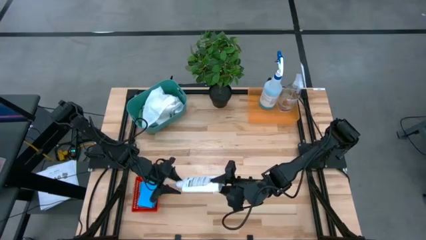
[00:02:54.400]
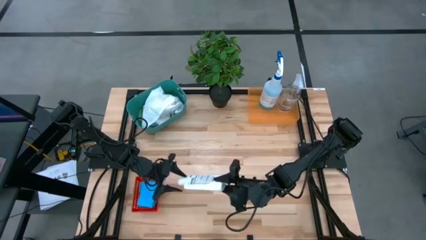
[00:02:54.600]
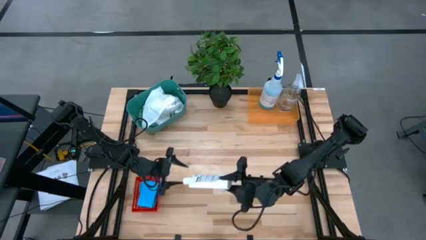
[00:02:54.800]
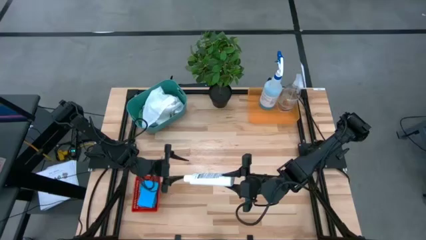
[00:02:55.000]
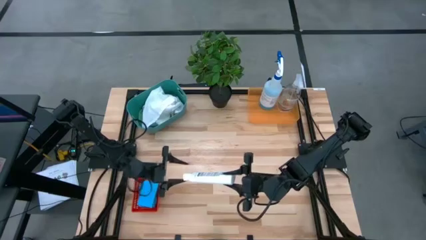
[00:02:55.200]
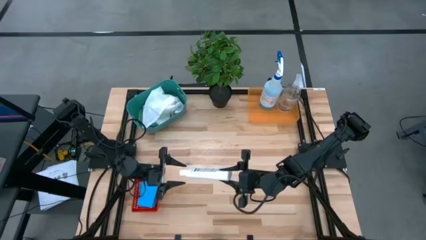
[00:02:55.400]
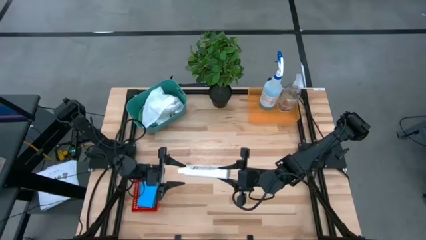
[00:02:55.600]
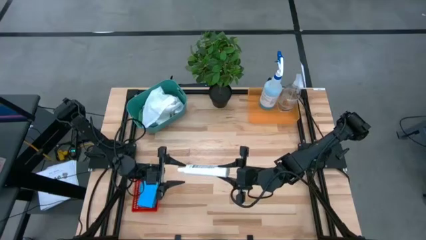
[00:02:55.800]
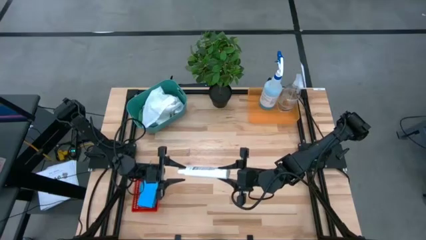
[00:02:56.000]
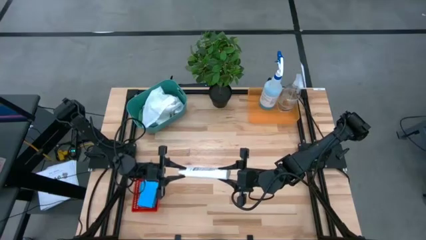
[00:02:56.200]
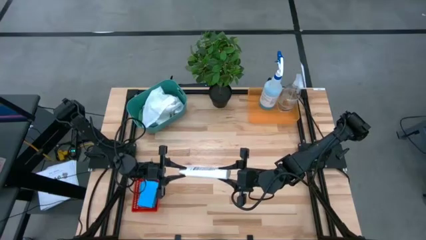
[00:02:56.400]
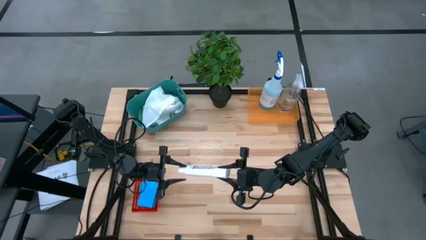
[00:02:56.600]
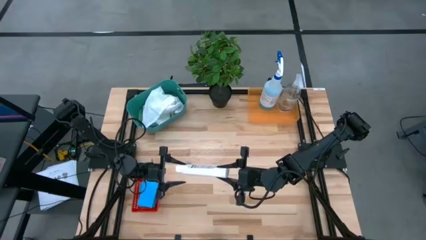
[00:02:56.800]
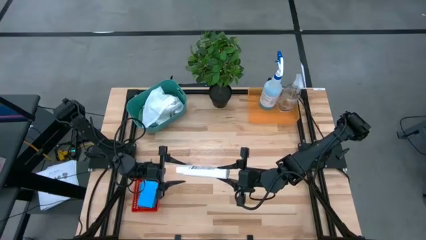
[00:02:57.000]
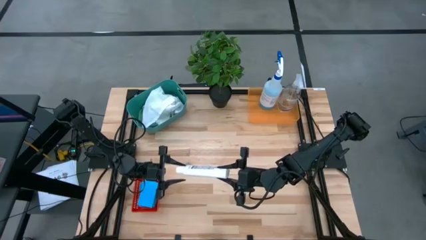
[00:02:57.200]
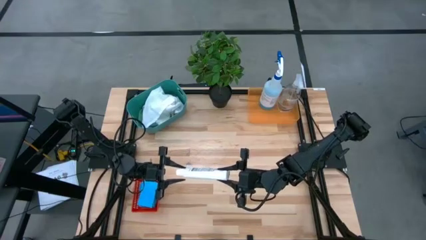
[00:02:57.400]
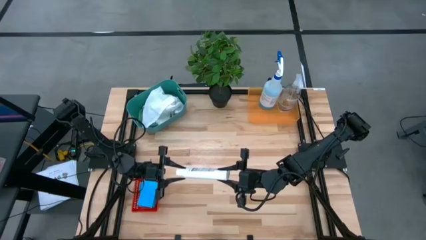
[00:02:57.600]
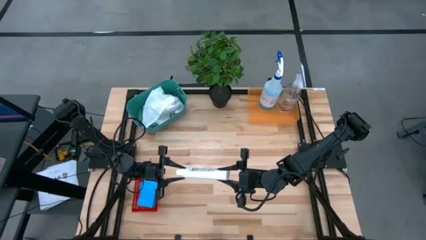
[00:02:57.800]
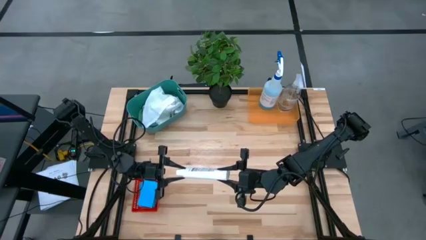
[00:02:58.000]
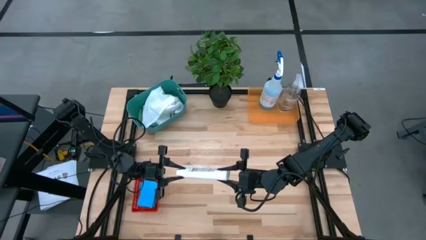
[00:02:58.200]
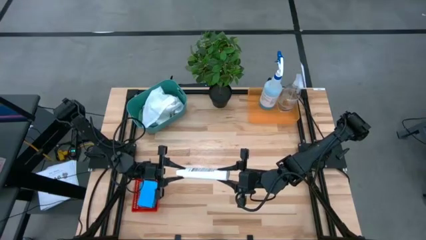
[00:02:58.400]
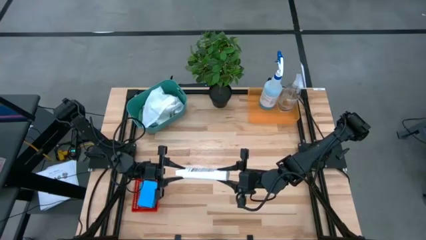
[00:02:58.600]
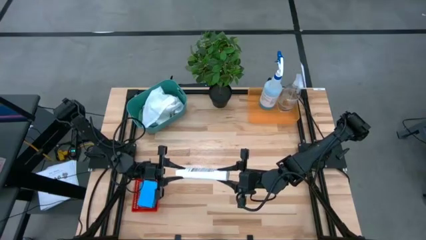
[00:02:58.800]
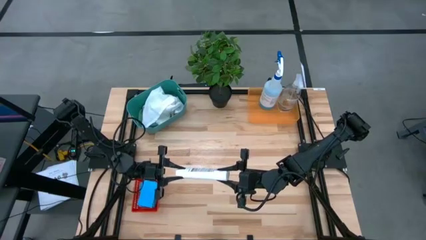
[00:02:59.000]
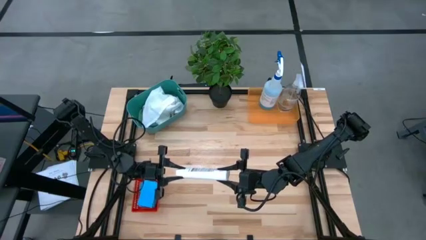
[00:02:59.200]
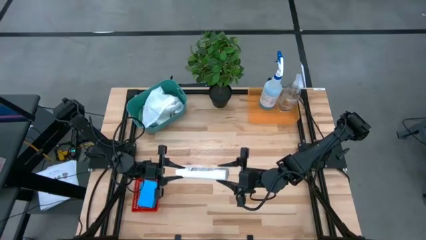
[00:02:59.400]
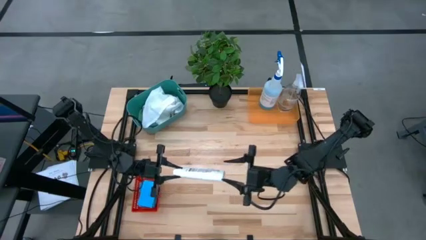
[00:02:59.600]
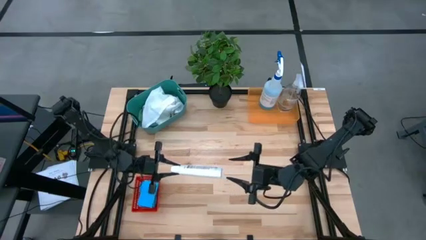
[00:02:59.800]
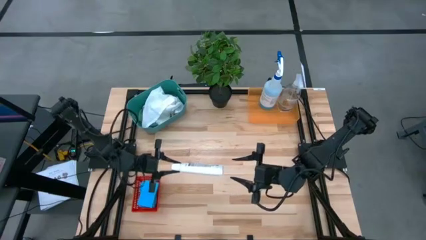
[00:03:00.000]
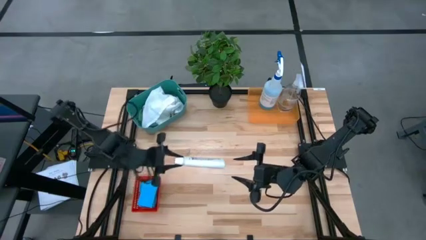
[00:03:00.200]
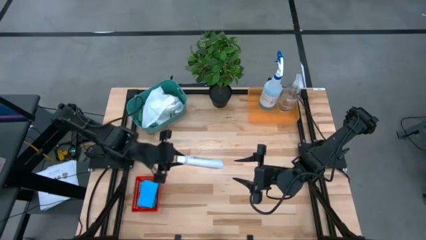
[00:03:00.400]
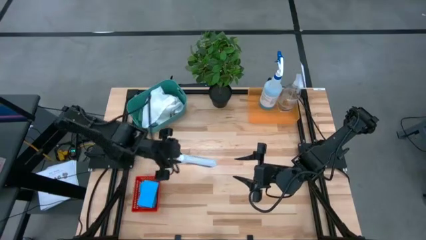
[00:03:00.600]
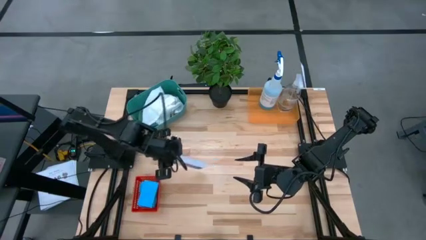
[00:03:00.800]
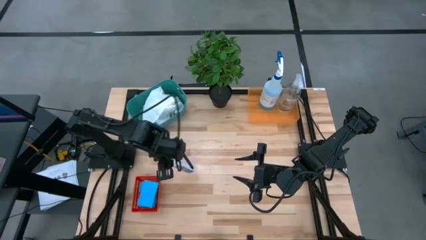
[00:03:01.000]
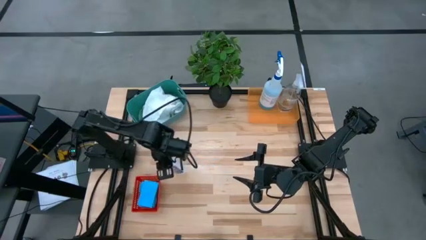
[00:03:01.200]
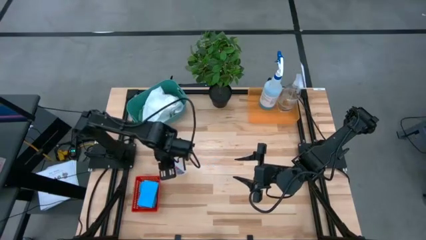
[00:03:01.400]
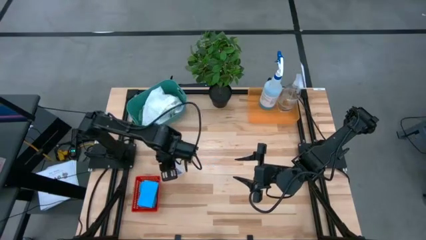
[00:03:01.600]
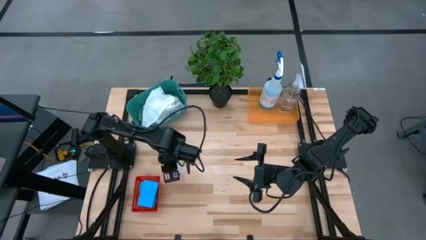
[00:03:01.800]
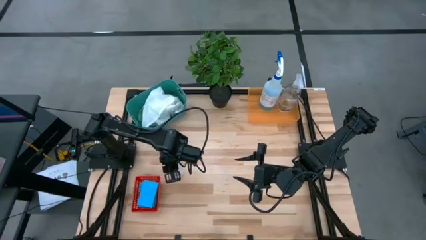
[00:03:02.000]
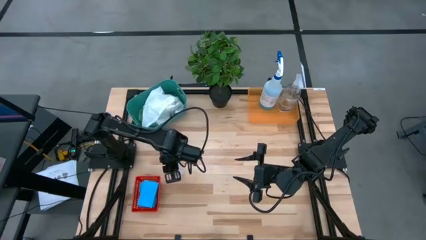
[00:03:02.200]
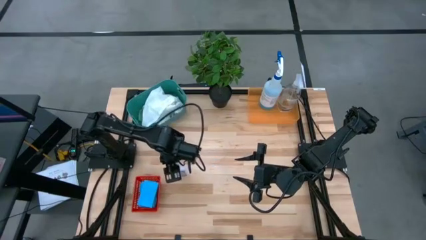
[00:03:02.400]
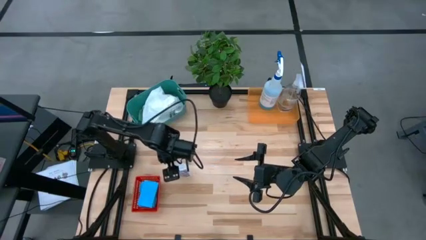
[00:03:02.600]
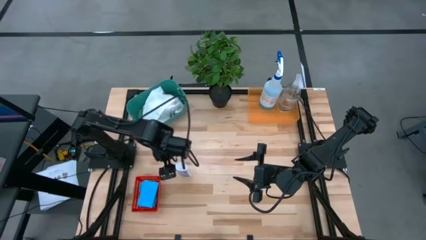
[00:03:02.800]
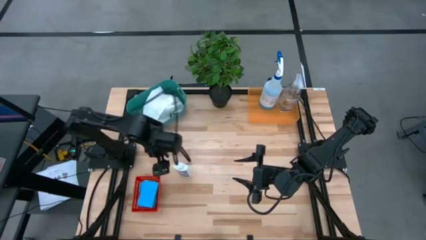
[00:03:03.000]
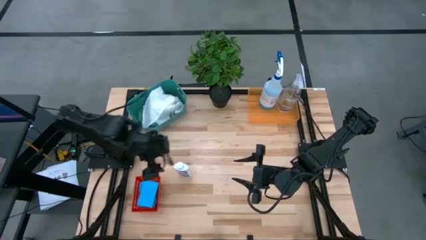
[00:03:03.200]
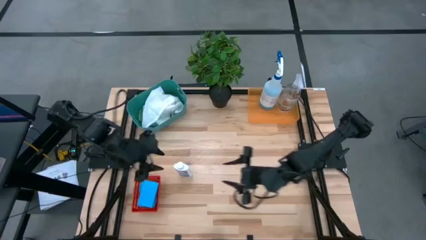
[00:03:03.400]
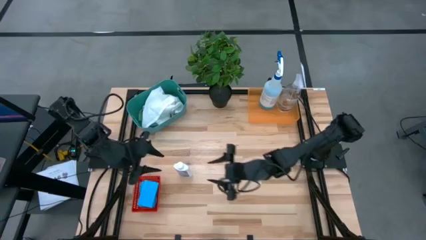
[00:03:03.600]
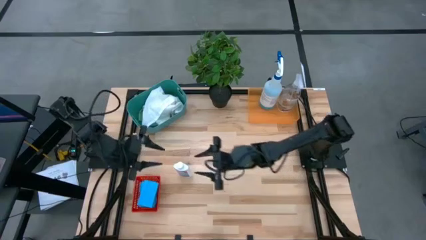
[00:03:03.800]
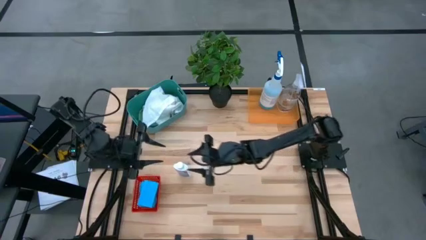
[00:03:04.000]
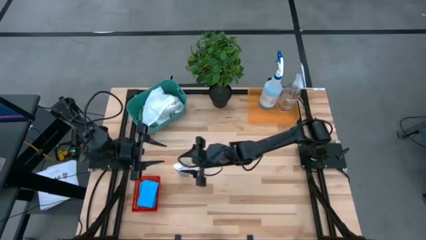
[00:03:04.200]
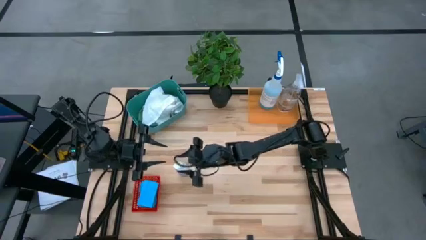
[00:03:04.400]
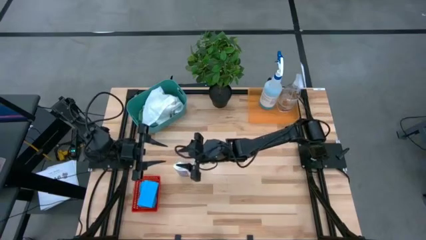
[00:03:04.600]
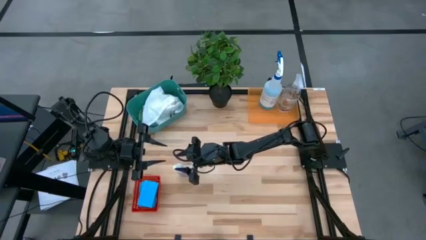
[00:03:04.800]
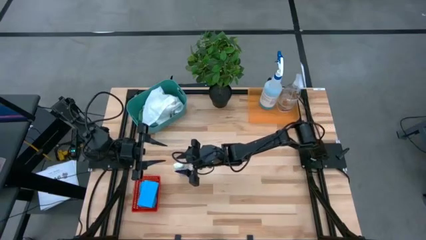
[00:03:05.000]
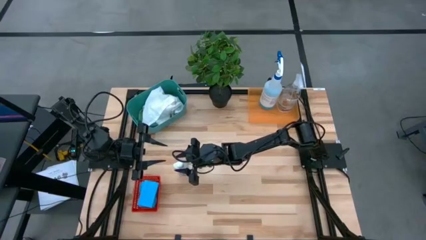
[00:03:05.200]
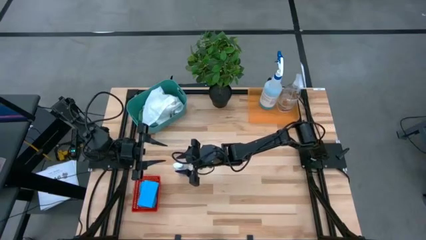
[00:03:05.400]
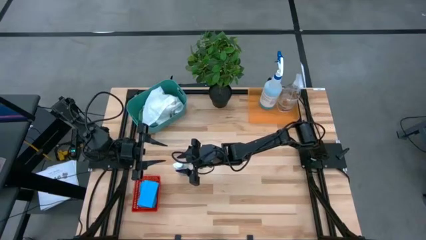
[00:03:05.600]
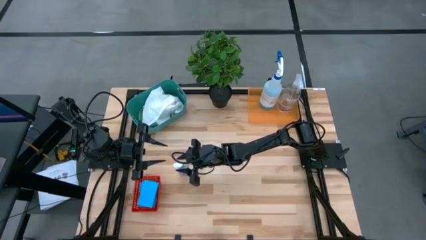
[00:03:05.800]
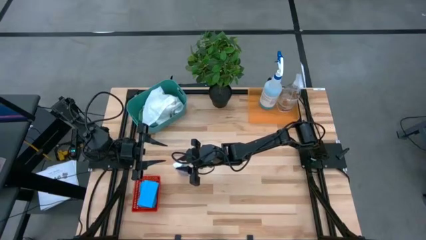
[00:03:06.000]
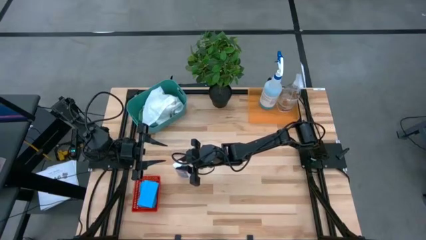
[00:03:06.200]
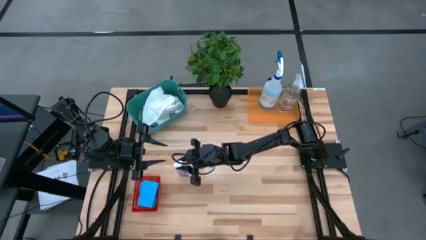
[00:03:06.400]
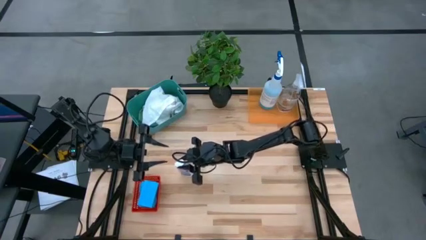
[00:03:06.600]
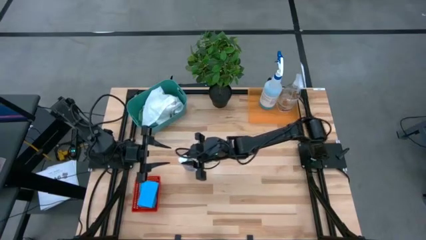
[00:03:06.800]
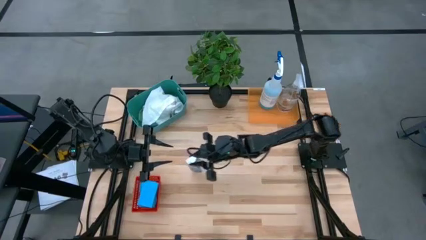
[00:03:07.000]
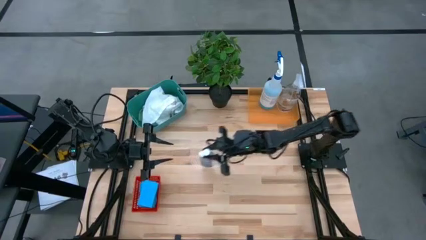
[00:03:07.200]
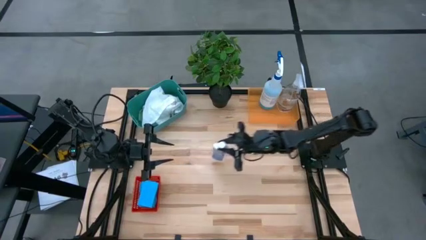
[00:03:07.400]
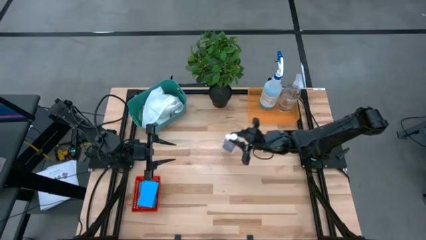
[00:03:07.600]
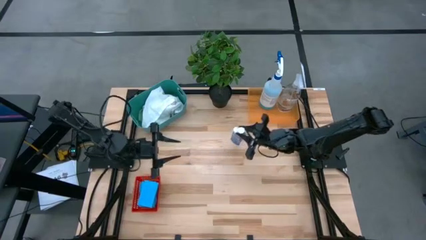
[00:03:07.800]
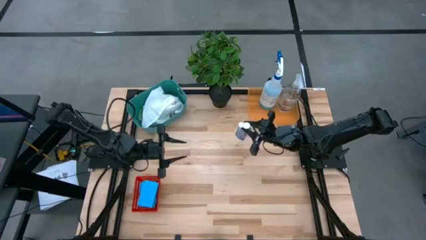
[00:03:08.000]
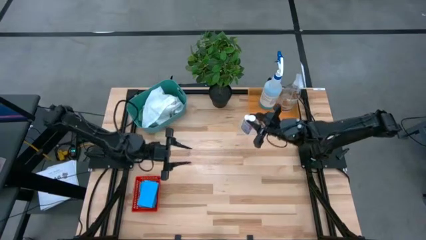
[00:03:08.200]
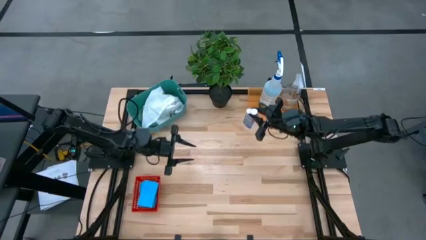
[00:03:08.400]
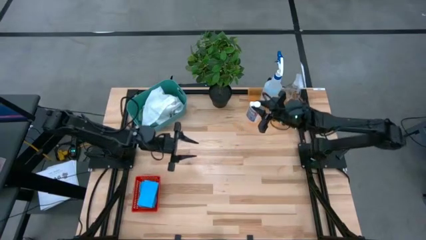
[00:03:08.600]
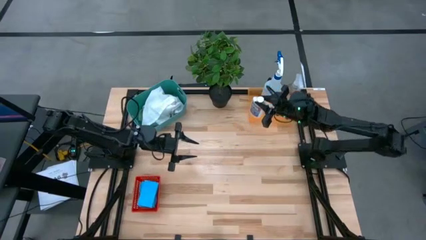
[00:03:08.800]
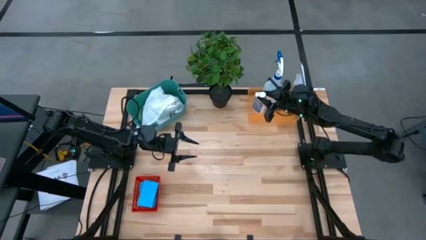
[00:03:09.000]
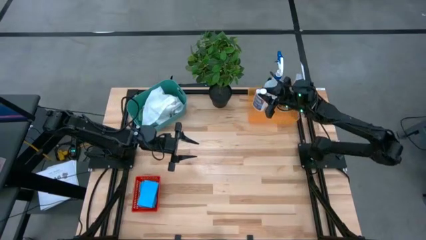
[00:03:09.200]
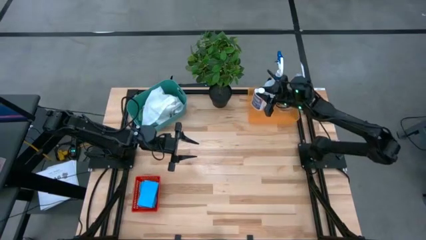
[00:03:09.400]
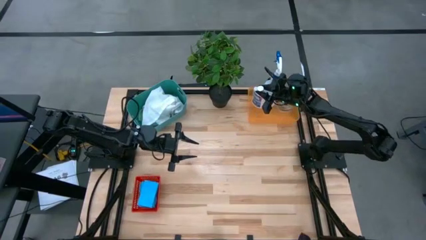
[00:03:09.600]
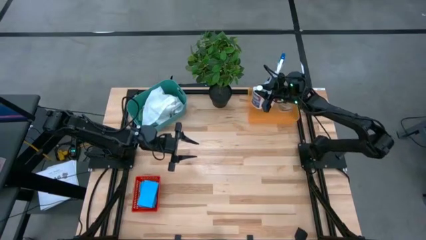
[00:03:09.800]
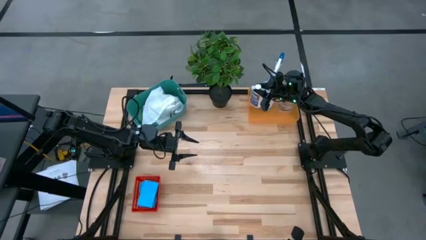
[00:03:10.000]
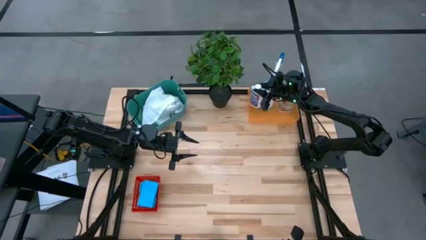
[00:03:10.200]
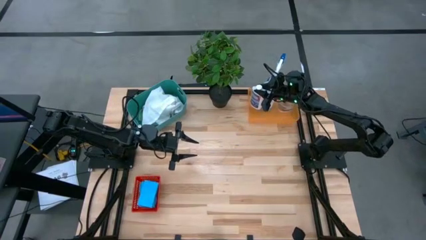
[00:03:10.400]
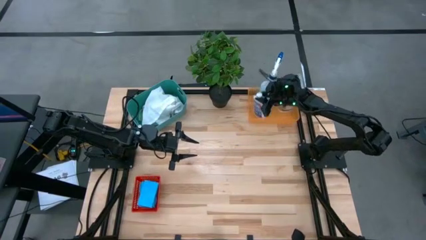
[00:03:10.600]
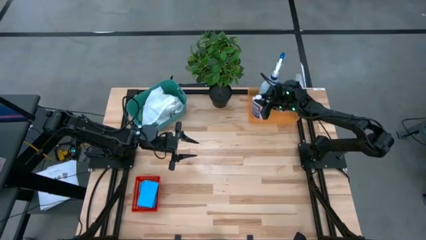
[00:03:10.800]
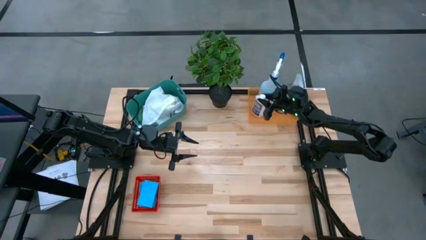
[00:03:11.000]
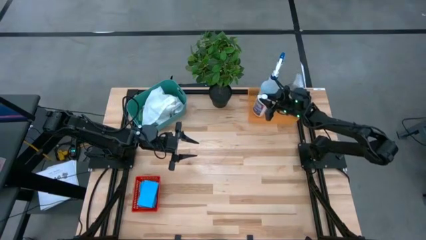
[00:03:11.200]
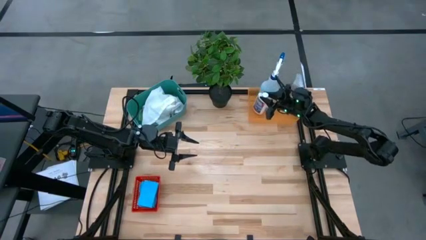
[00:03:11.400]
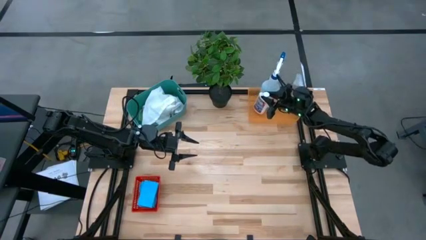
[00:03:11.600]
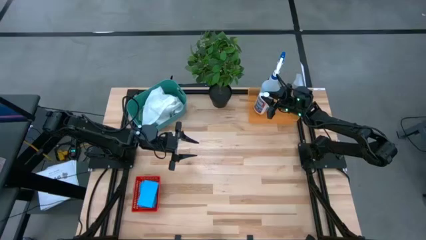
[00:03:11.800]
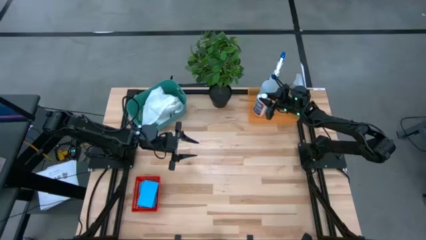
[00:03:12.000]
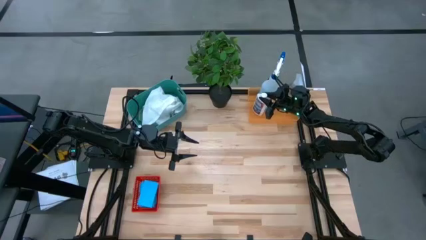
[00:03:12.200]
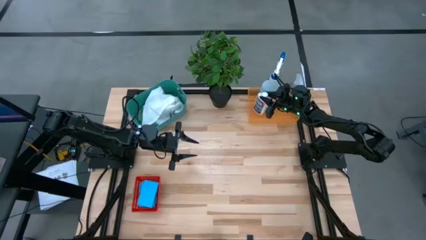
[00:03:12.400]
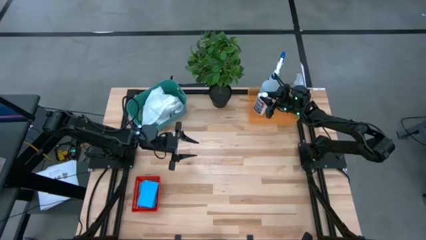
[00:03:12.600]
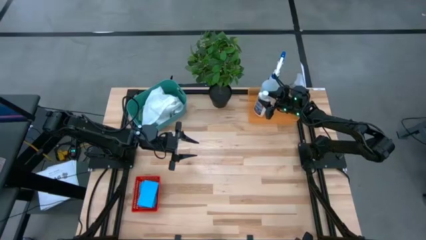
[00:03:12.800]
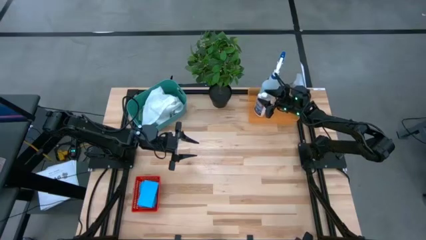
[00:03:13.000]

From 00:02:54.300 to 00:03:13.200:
Task: Pick & Place Kitchen Items
Put the clear restorer into the orange bin
